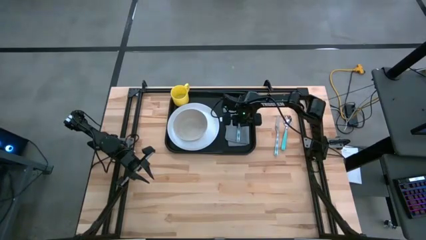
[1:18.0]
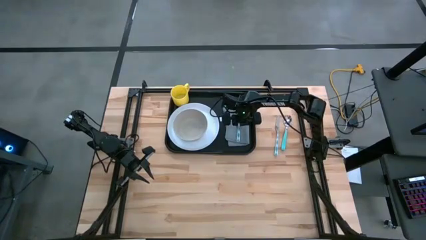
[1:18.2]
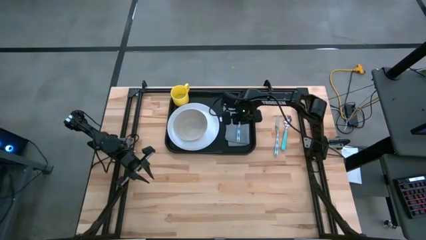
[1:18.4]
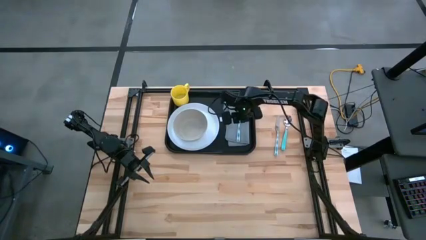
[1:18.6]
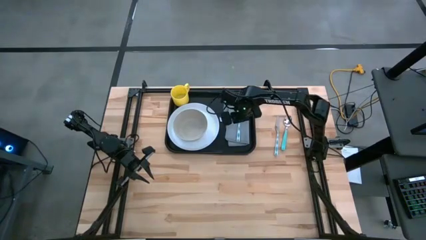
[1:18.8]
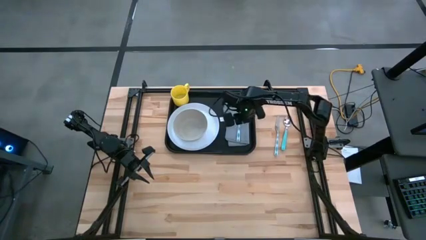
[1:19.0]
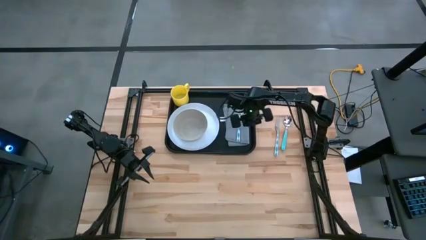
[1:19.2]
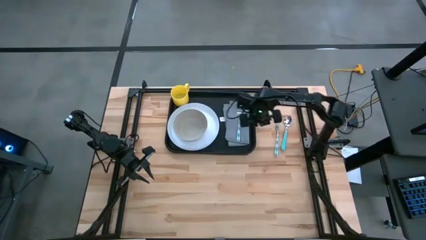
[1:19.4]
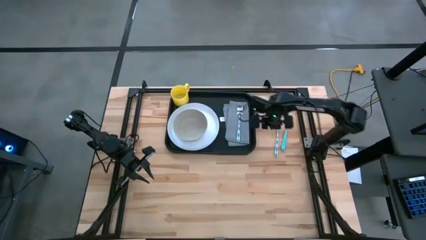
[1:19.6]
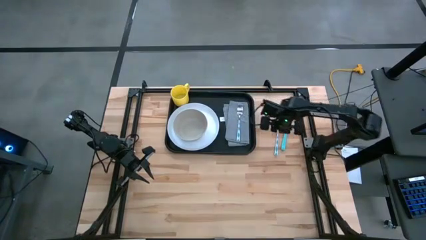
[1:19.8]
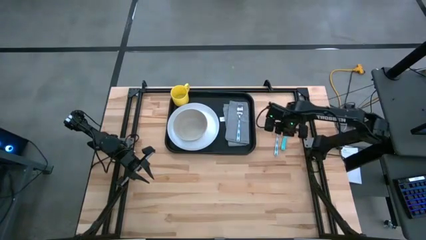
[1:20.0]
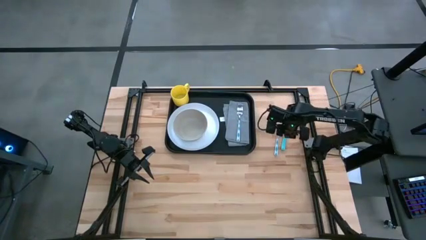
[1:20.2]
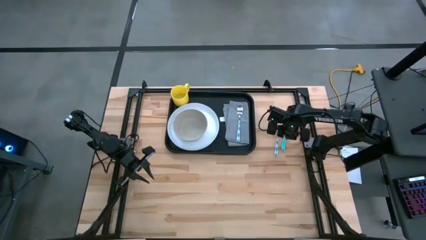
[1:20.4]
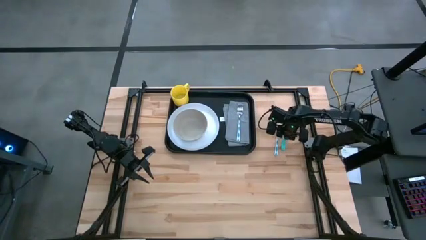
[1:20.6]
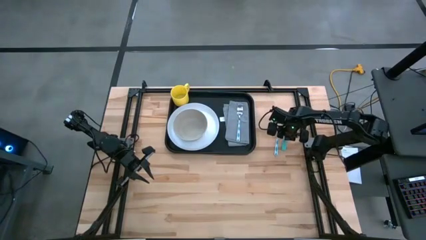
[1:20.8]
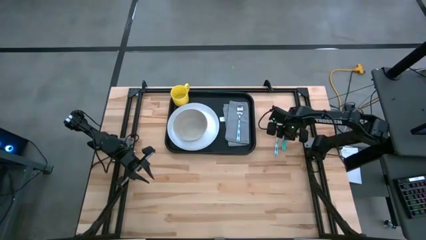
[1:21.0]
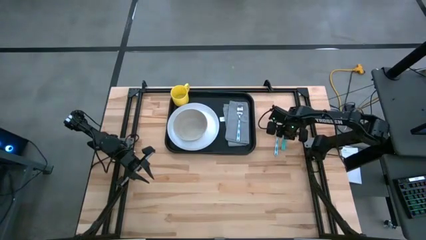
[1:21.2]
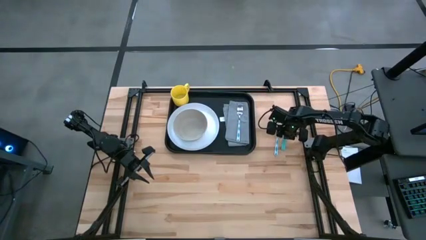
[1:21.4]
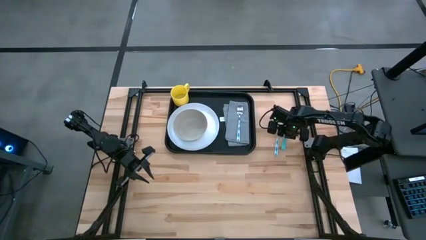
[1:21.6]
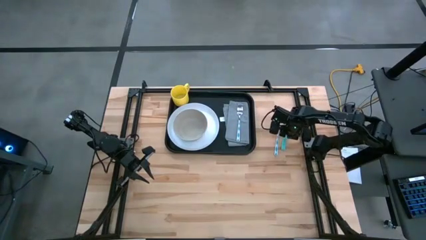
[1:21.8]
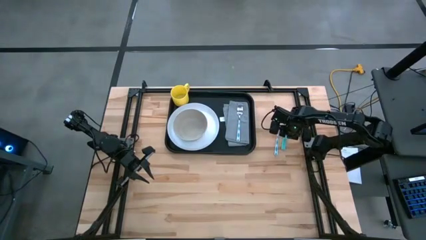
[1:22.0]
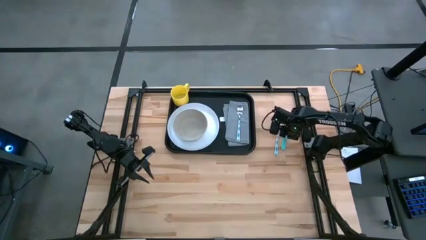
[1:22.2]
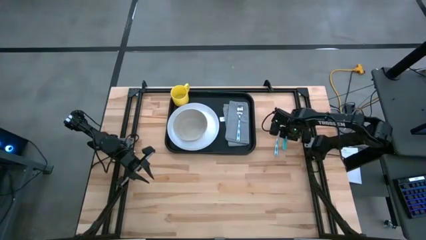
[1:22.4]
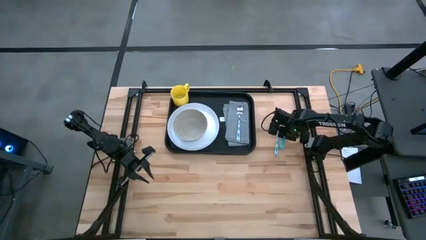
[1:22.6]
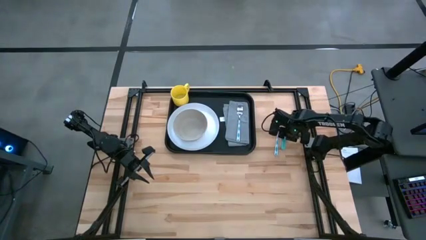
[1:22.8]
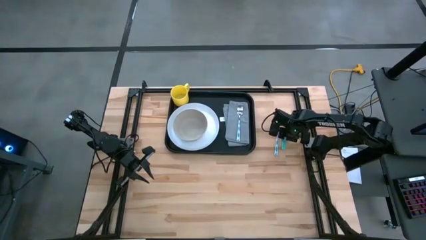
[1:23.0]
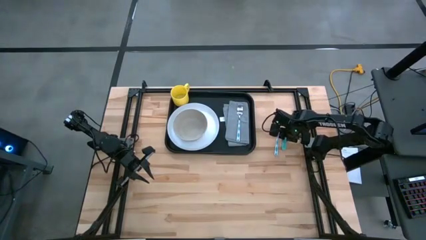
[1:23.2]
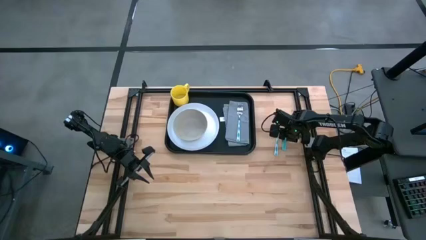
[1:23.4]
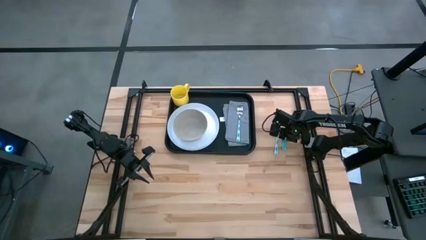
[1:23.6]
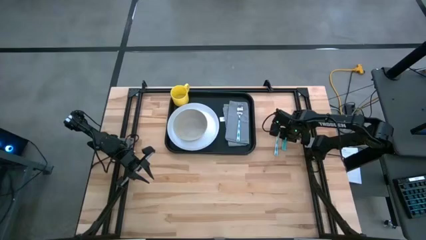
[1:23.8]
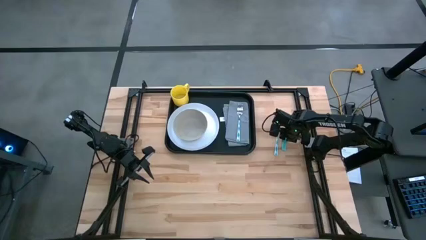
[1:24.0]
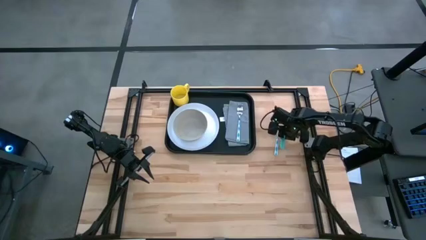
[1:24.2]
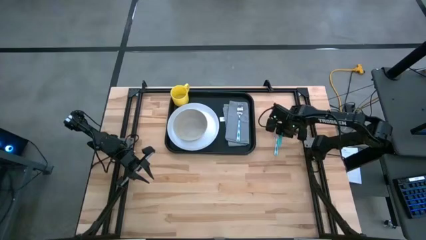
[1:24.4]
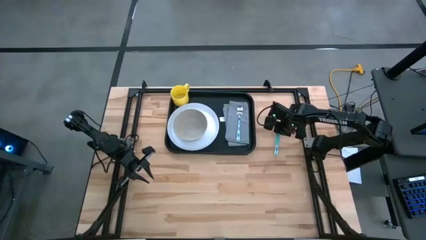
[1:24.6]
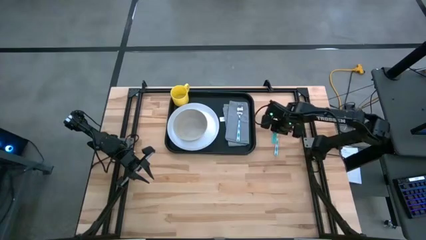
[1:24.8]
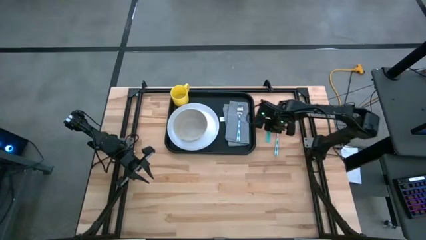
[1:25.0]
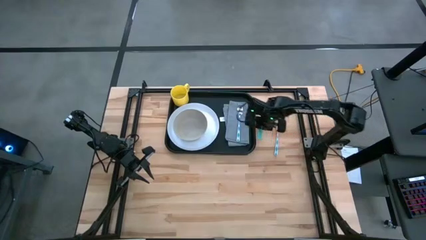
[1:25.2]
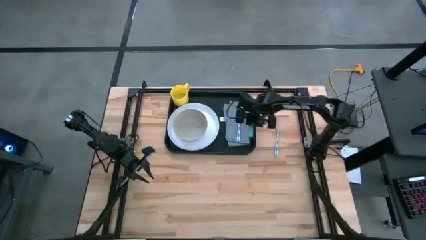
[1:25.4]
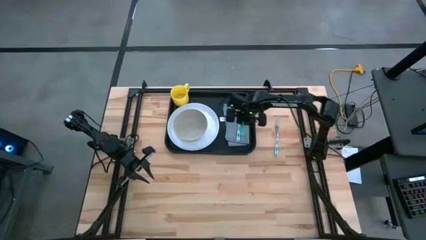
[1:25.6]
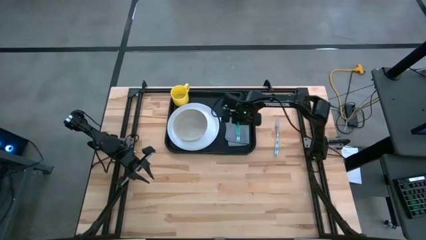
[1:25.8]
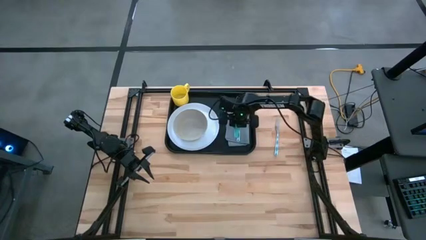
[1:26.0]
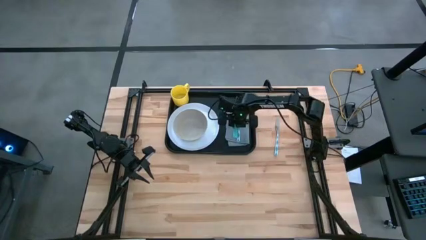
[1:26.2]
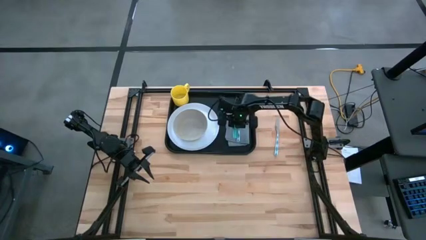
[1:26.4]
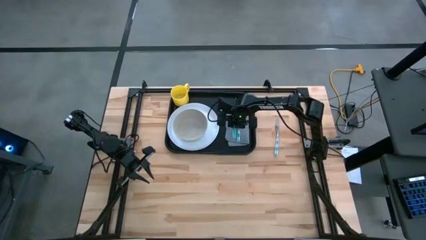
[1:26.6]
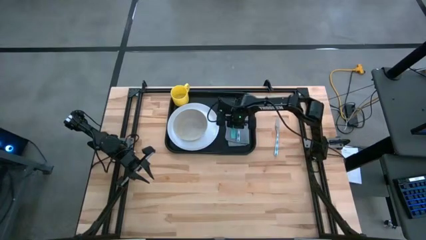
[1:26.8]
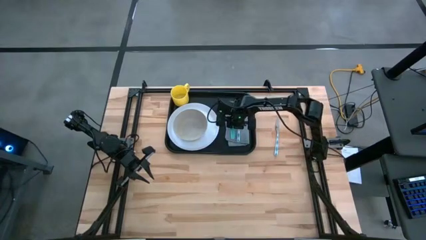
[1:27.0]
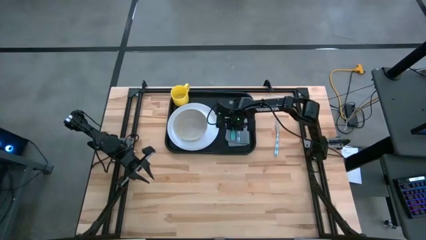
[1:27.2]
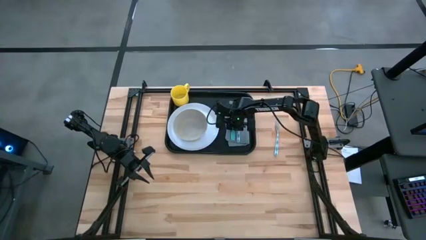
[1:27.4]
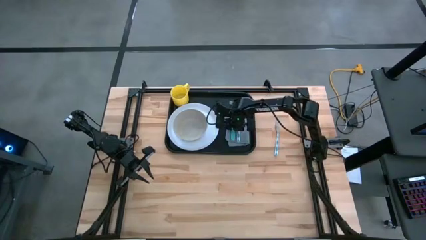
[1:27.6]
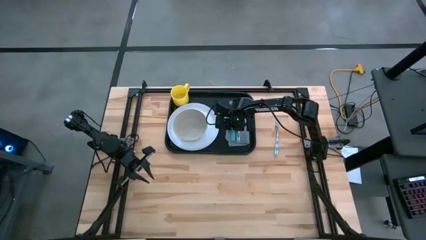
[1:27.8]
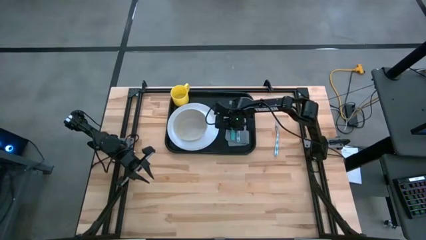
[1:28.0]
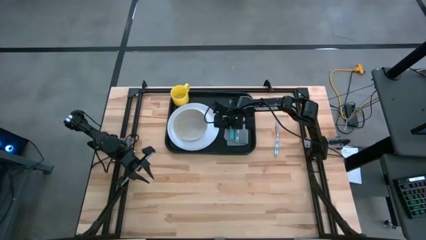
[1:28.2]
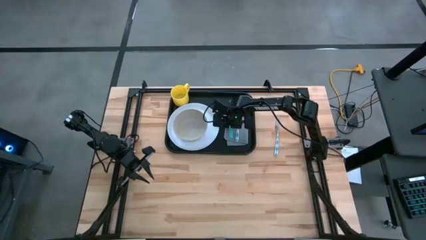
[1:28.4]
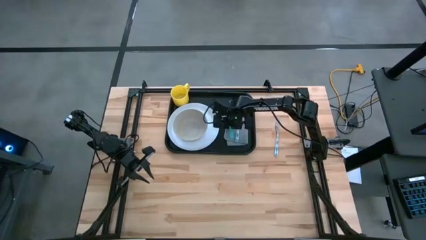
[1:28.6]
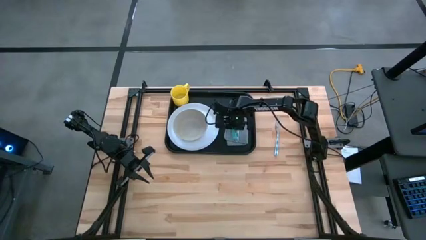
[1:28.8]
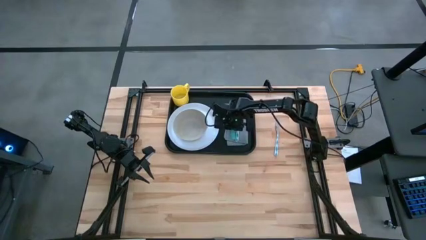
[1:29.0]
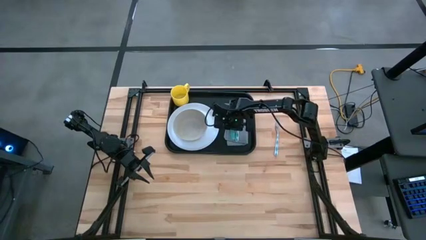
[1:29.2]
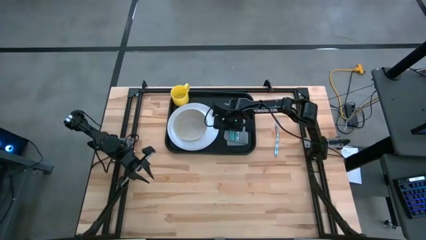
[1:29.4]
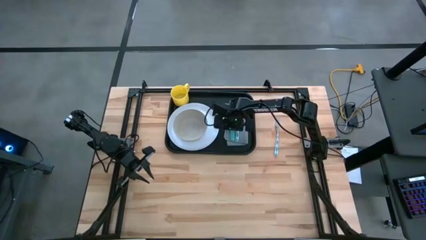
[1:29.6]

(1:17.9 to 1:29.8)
Task: Set up tray
Put the blue spoon to the left of the white fork on top of the gray napkin on the black tray
